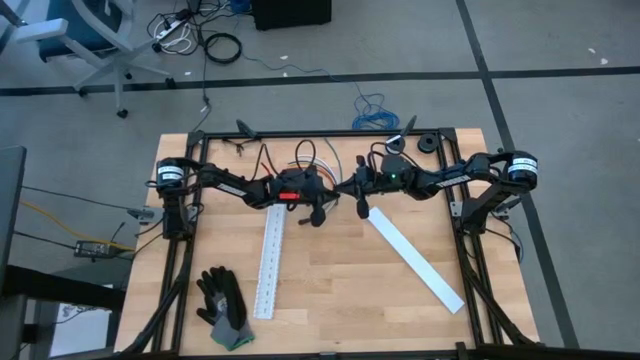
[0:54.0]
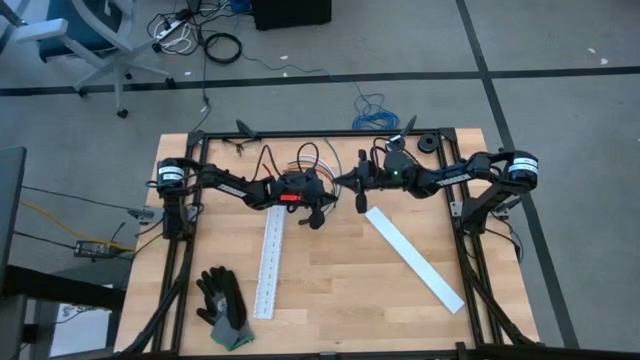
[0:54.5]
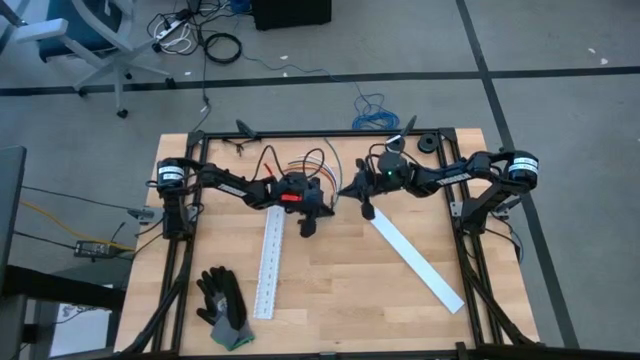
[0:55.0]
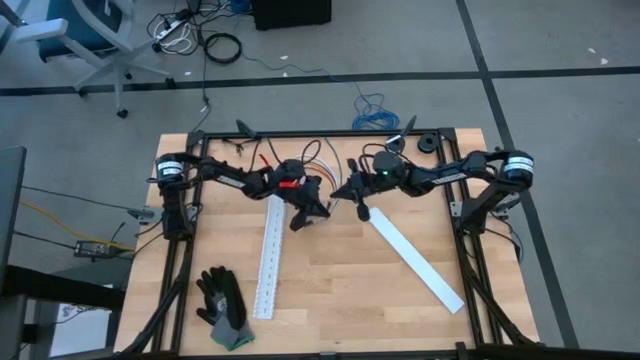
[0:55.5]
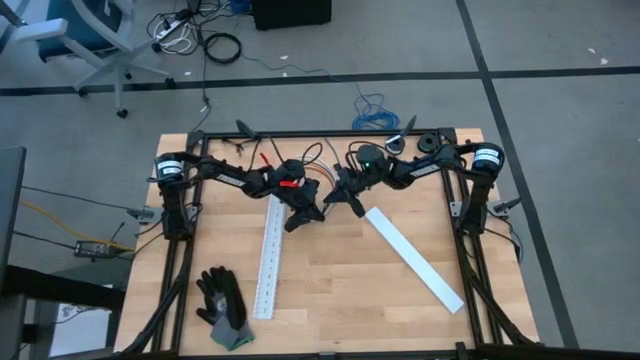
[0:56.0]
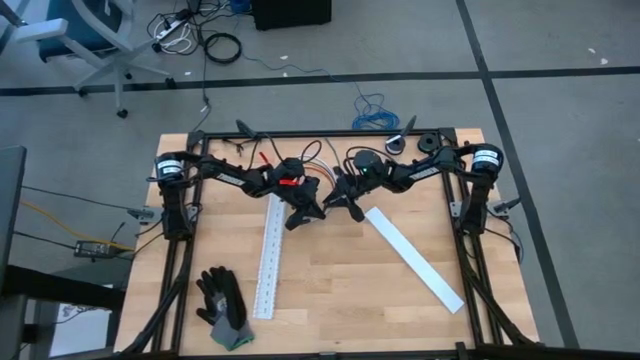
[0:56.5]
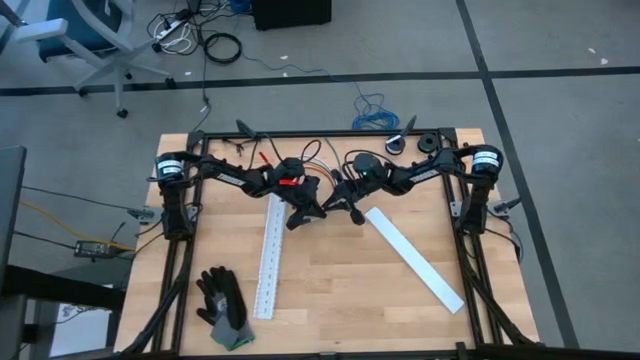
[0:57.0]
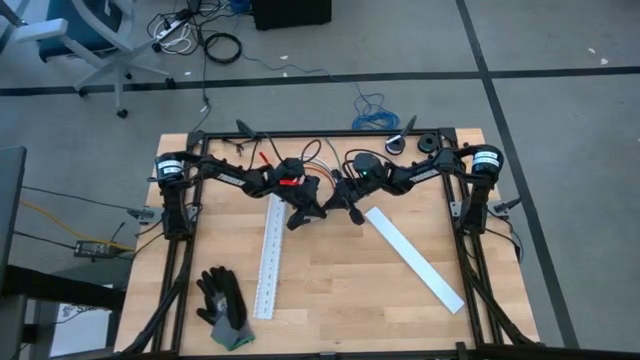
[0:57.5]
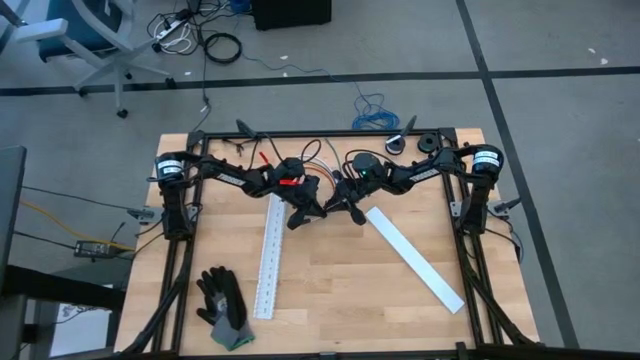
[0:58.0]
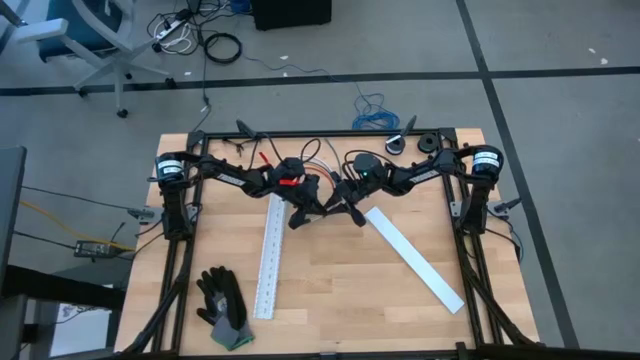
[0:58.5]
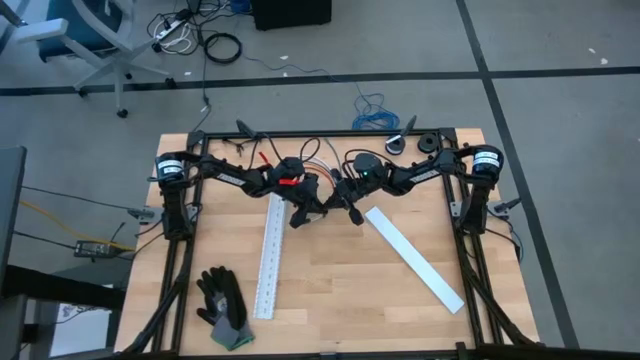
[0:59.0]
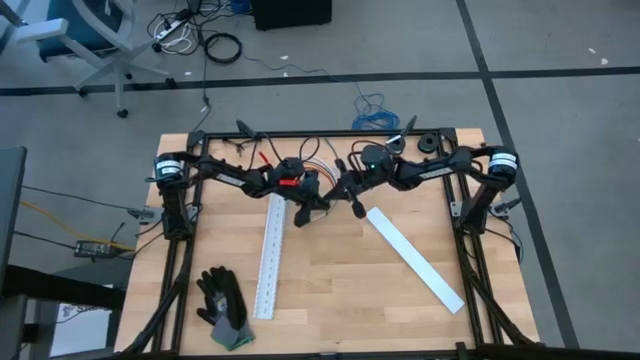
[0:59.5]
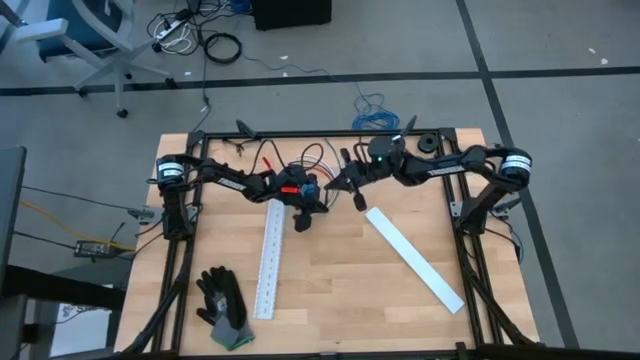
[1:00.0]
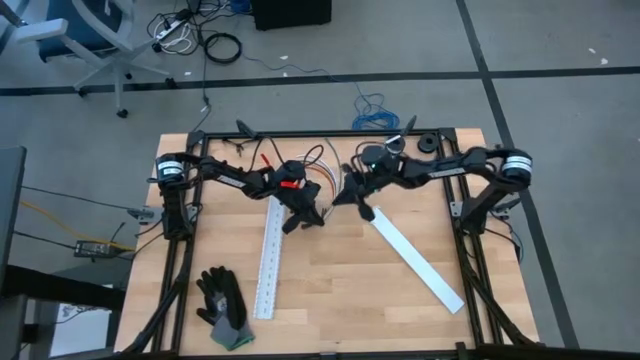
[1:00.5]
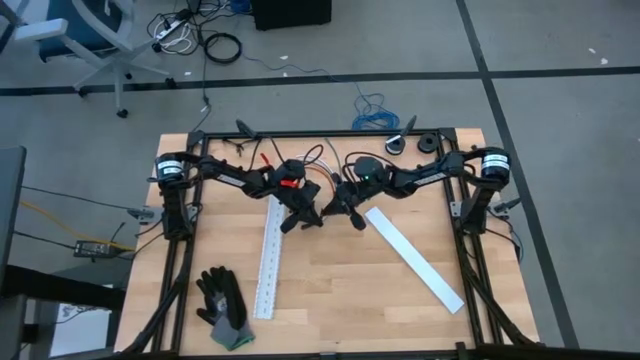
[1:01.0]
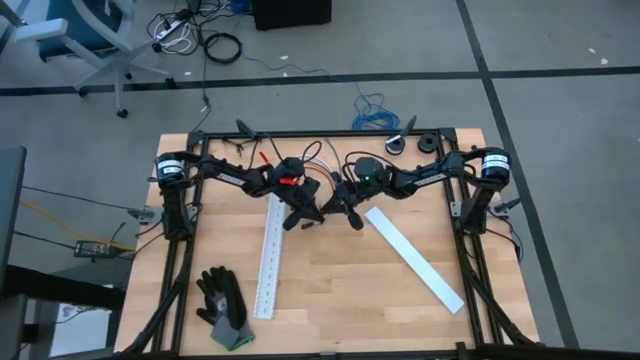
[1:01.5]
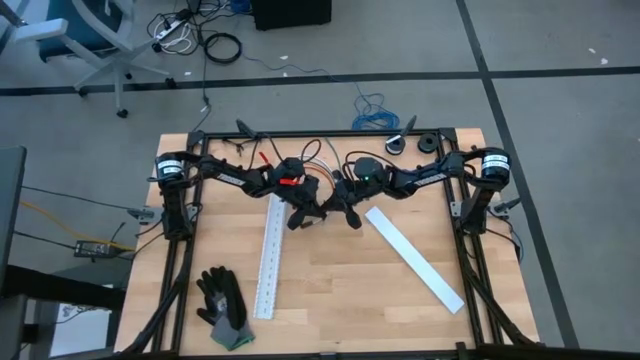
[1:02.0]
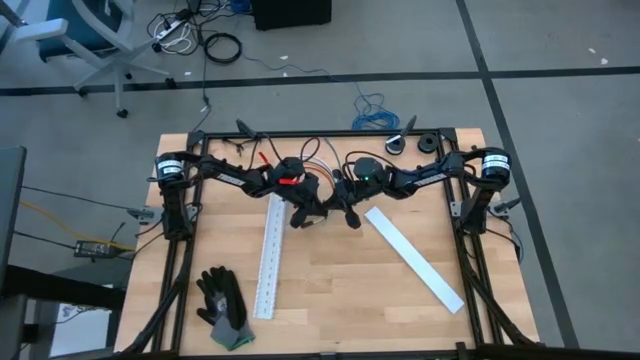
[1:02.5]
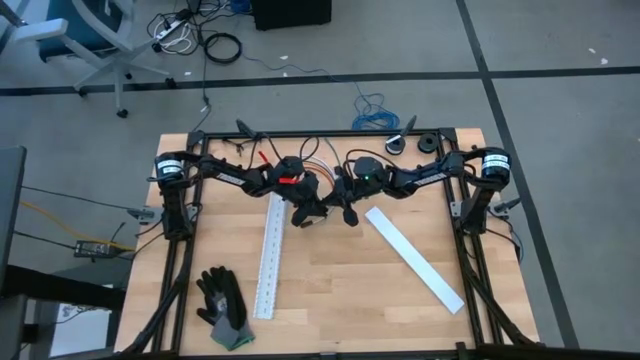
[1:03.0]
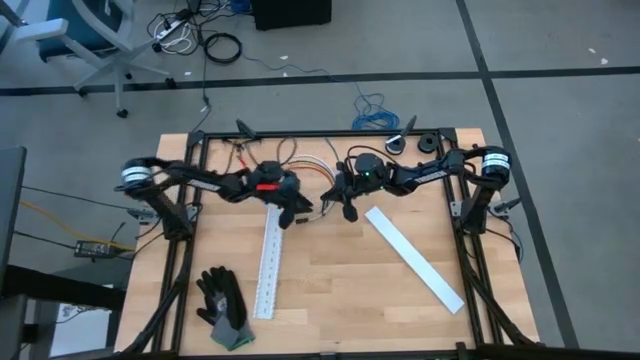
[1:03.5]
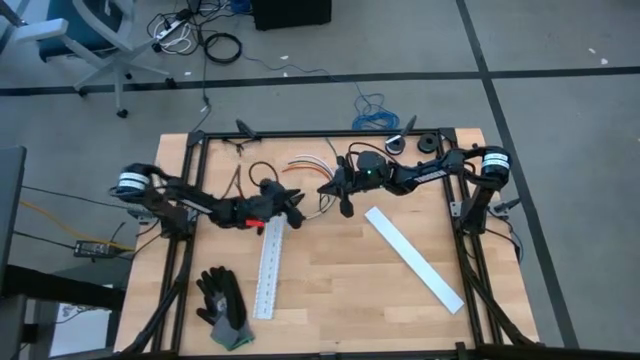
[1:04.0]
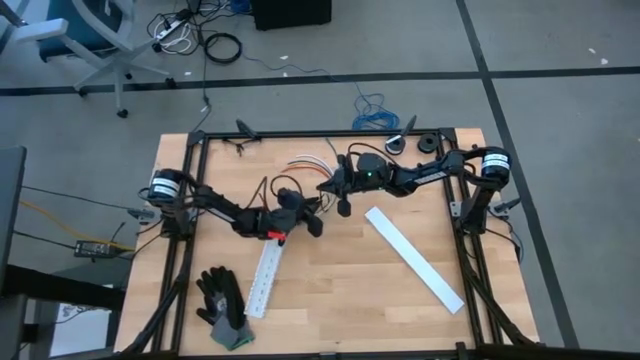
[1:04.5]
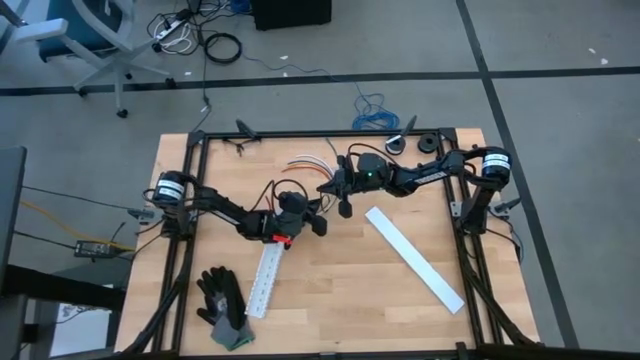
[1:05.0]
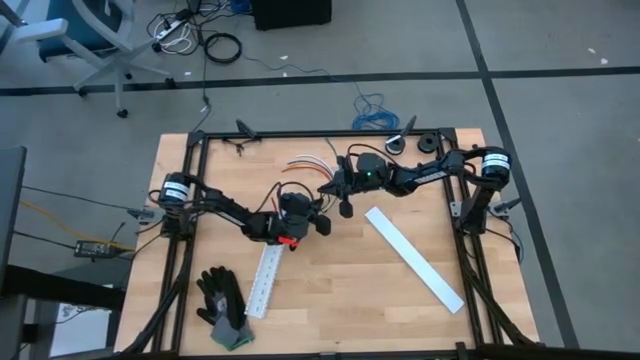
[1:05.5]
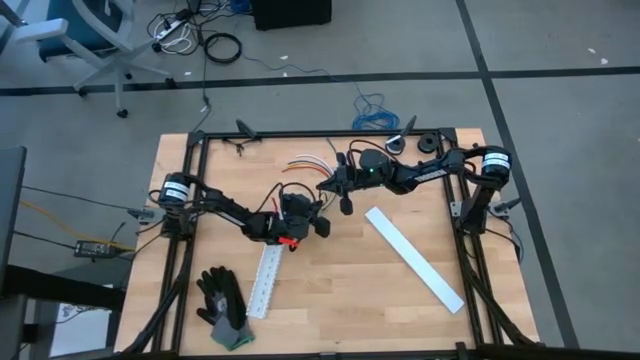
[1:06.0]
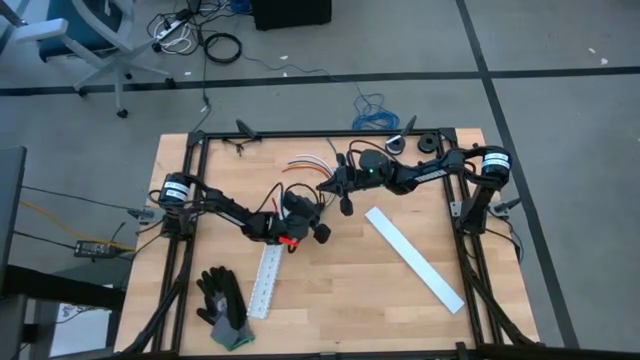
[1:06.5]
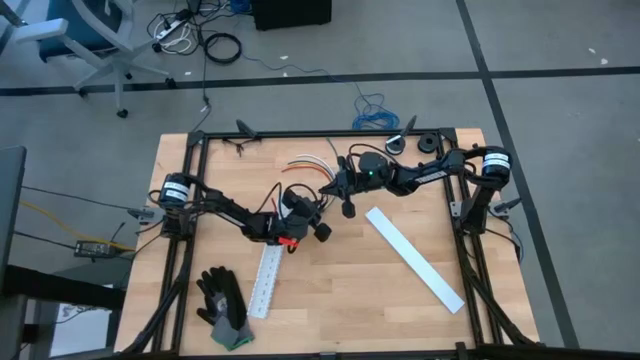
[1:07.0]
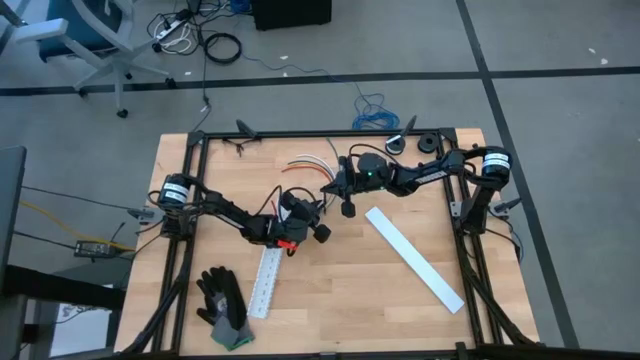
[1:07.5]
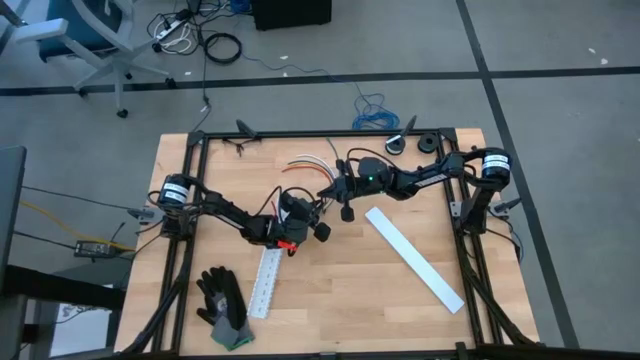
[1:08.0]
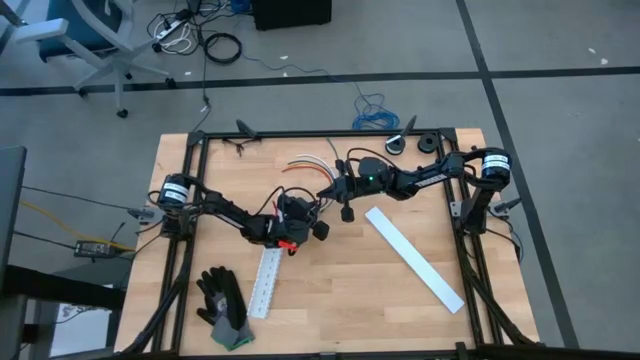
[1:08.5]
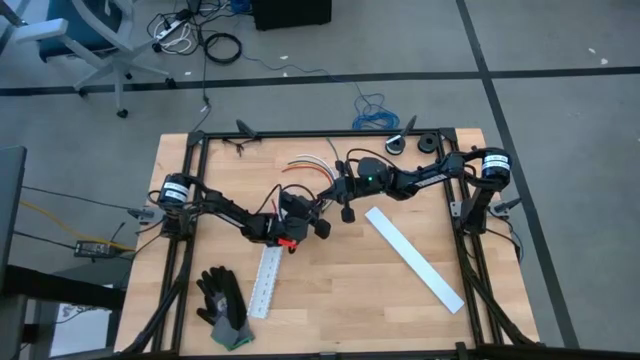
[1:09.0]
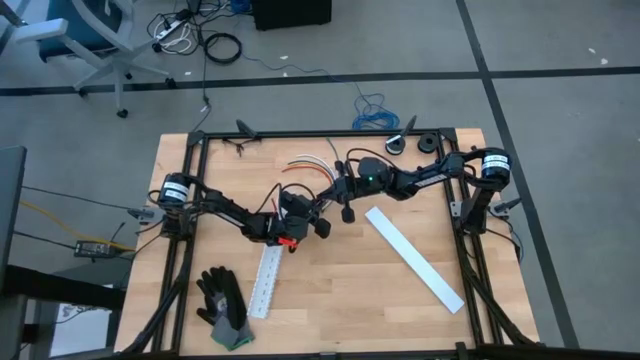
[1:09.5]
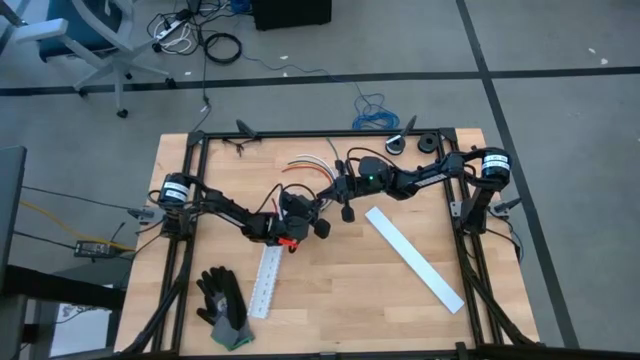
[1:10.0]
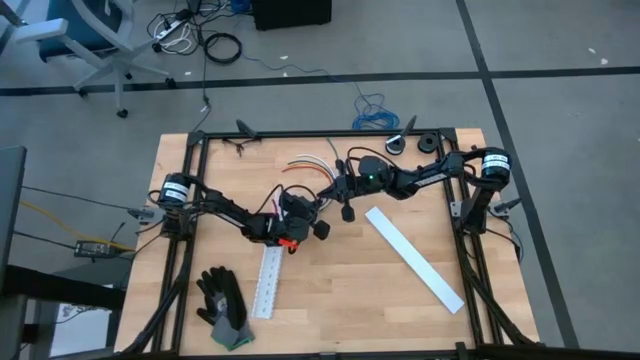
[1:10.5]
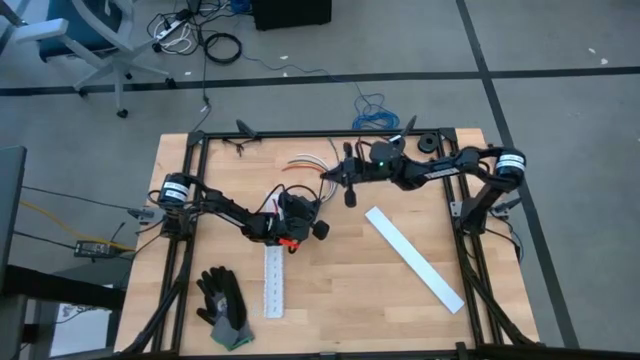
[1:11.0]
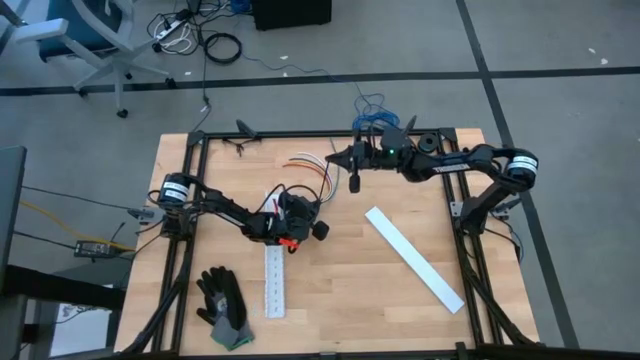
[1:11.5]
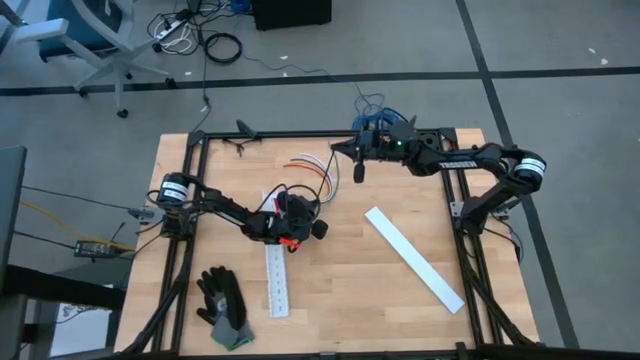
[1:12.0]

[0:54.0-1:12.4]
Task: Ziptie cables
Wrap the cable wires with the black zip tie

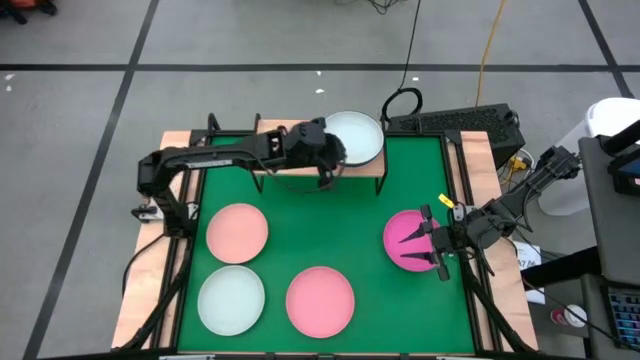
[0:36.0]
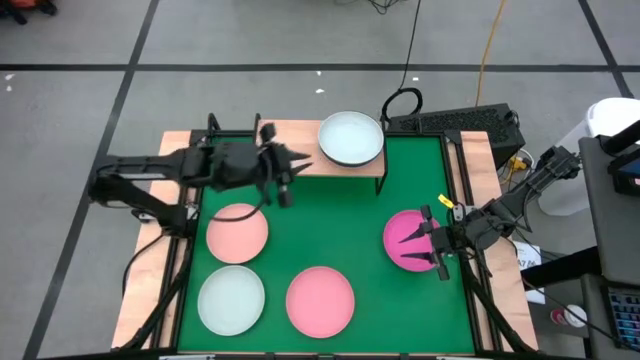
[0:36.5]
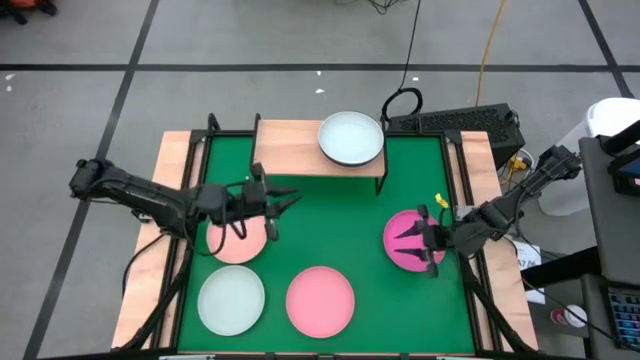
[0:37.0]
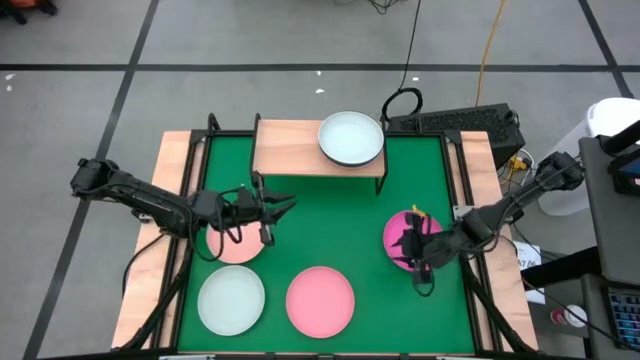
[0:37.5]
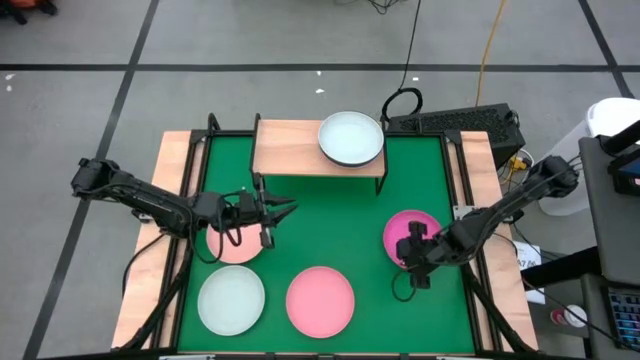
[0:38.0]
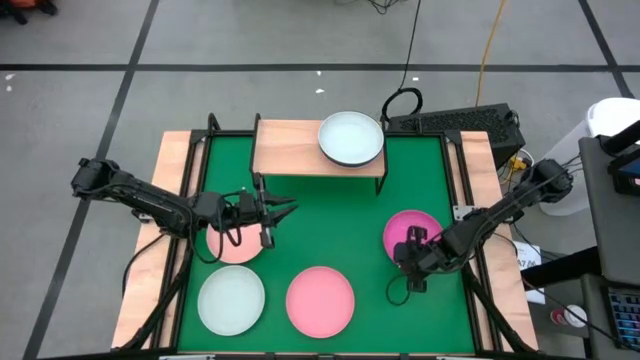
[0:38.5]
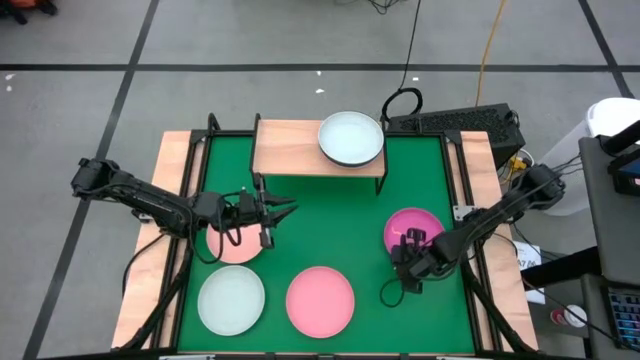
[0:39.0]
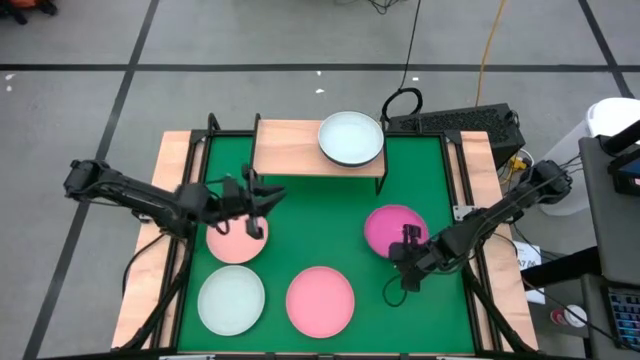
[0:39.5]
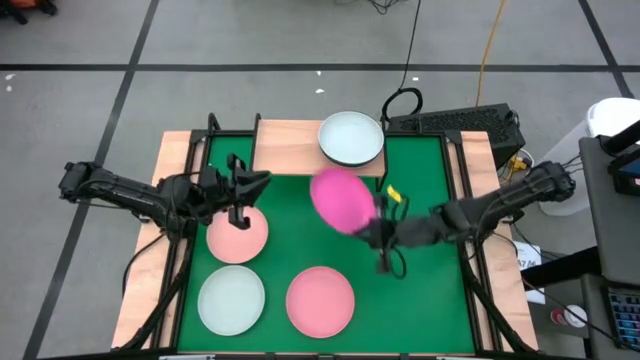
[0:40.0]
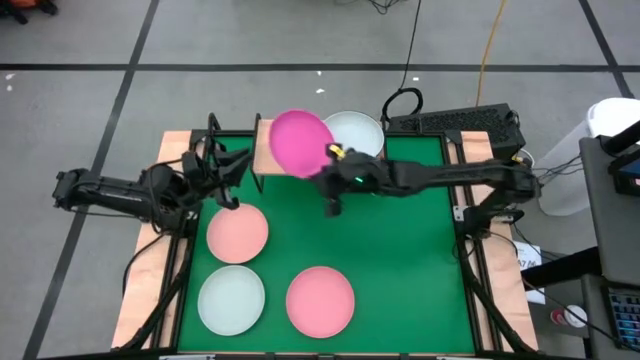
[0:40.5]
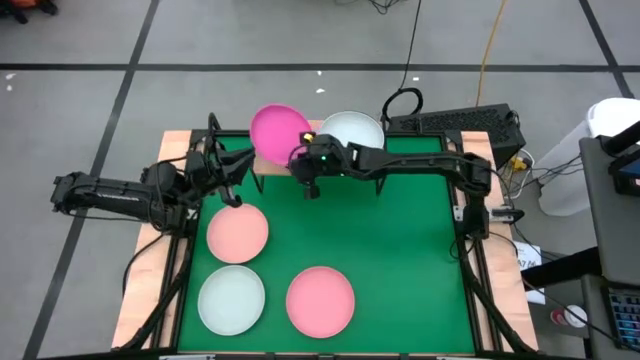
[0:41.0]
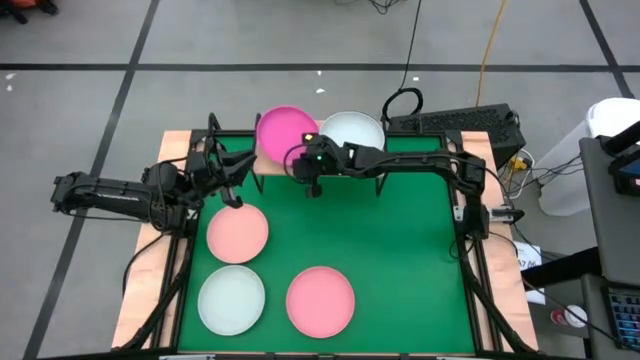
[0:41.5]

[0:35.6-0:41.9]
Task: Place and stack plates onto a shelf
Put the pink plate on the shelf
